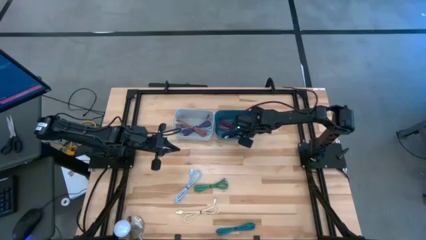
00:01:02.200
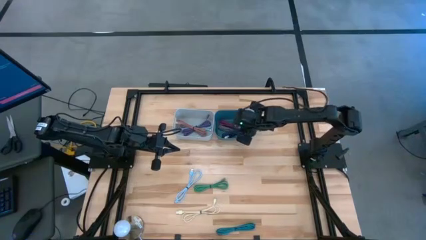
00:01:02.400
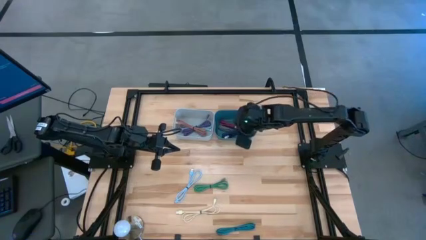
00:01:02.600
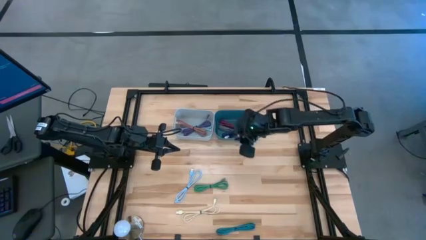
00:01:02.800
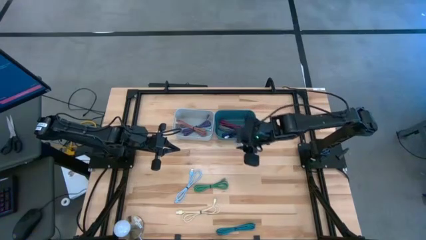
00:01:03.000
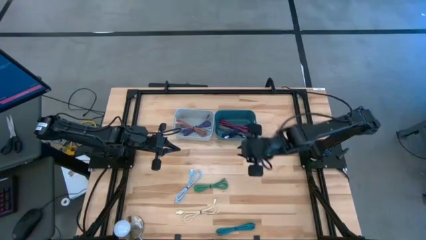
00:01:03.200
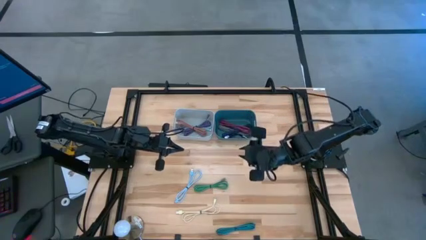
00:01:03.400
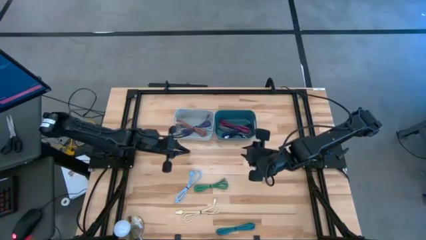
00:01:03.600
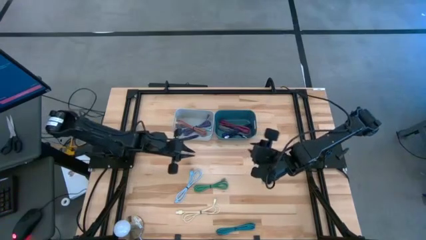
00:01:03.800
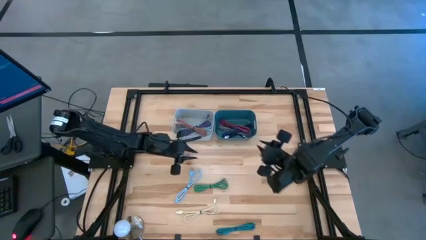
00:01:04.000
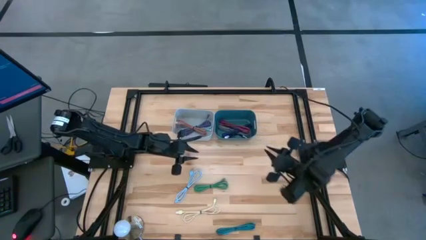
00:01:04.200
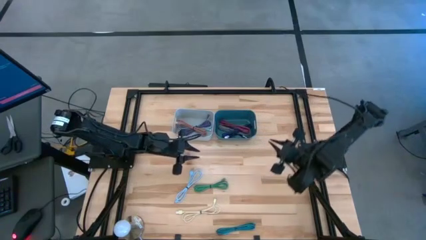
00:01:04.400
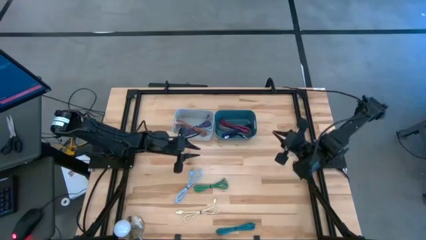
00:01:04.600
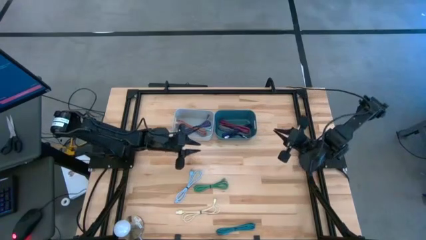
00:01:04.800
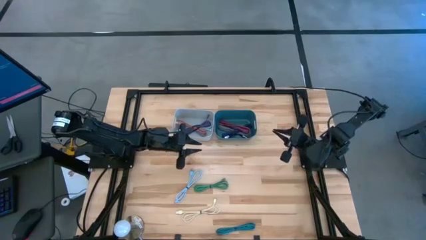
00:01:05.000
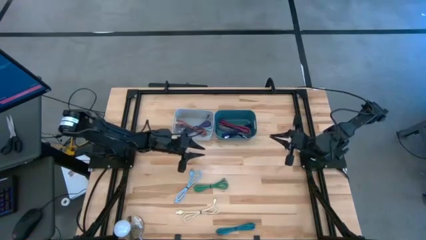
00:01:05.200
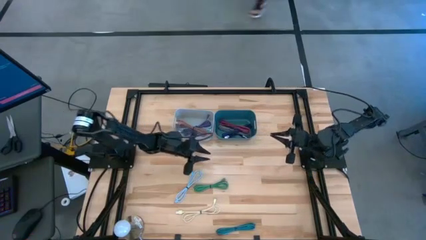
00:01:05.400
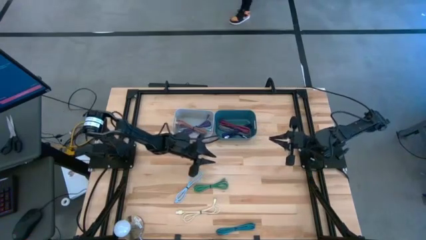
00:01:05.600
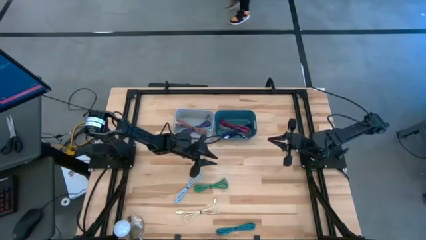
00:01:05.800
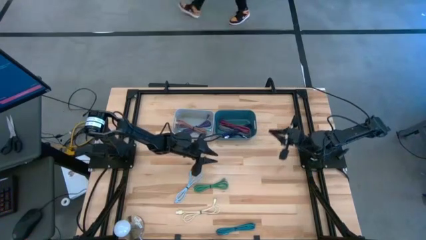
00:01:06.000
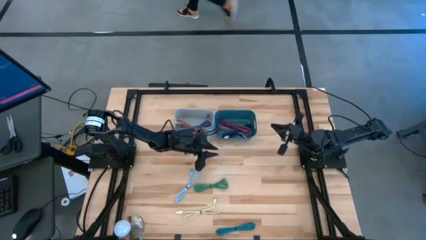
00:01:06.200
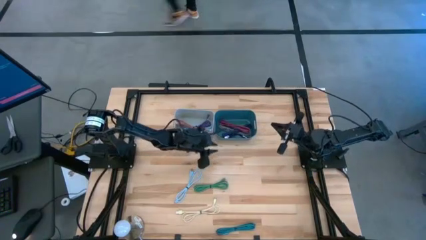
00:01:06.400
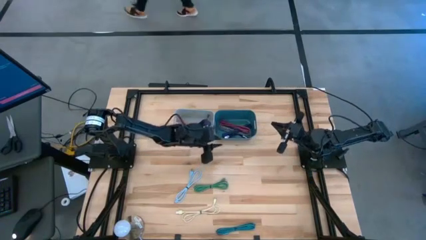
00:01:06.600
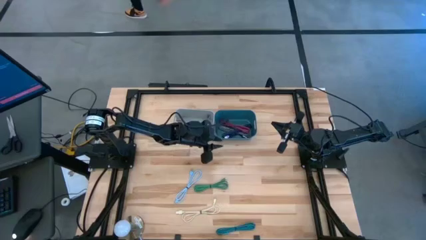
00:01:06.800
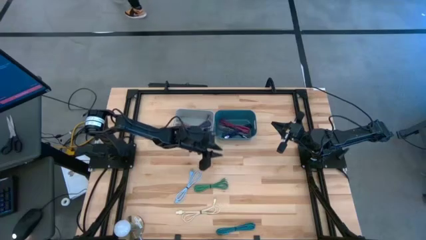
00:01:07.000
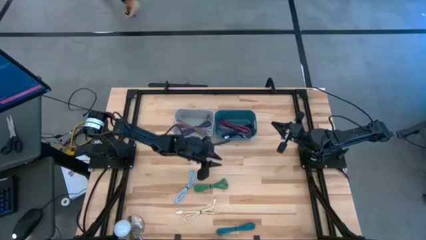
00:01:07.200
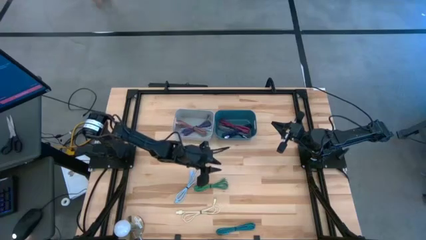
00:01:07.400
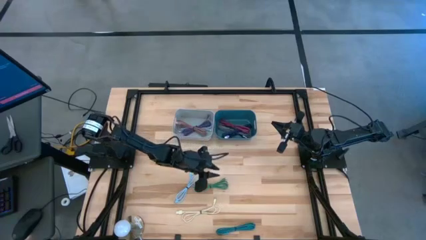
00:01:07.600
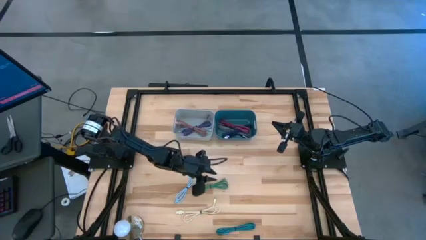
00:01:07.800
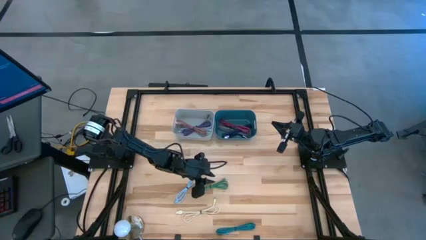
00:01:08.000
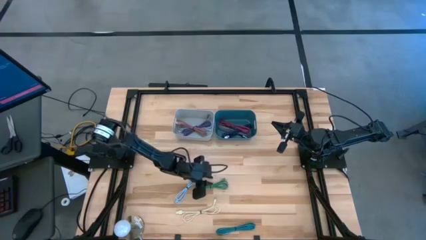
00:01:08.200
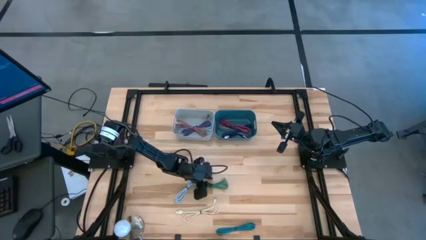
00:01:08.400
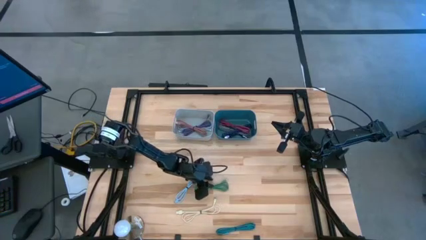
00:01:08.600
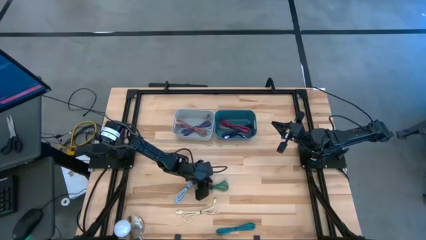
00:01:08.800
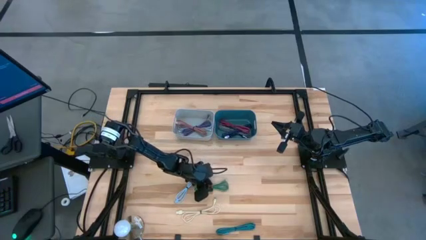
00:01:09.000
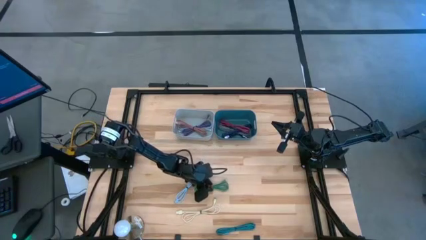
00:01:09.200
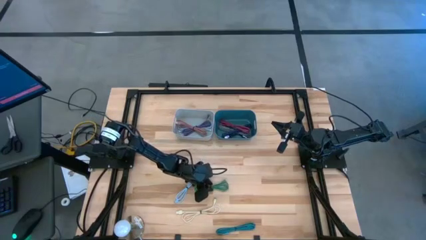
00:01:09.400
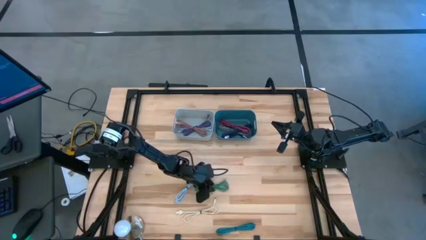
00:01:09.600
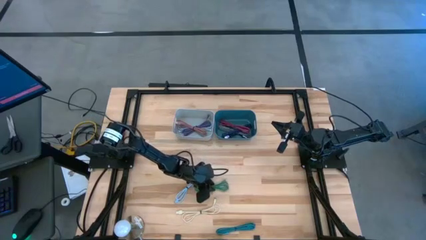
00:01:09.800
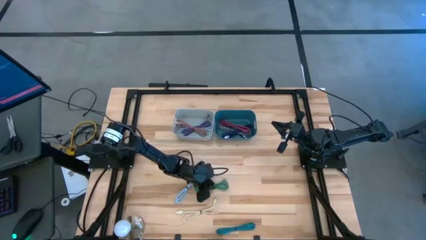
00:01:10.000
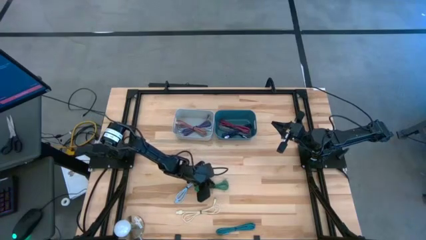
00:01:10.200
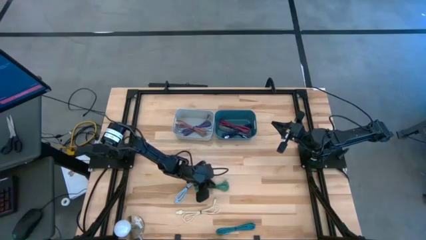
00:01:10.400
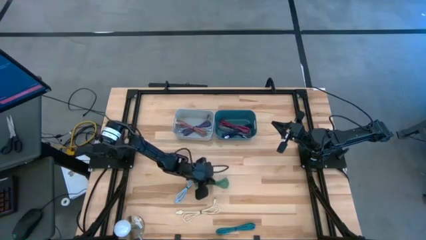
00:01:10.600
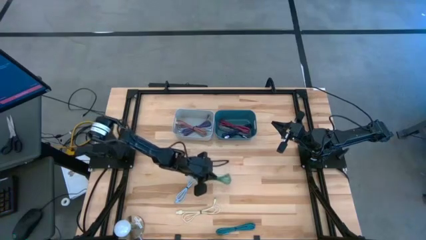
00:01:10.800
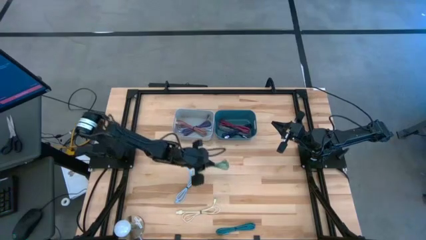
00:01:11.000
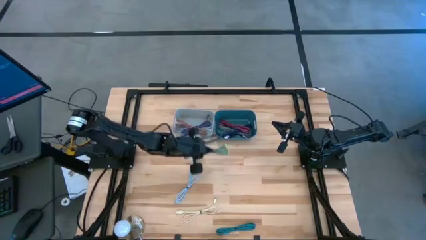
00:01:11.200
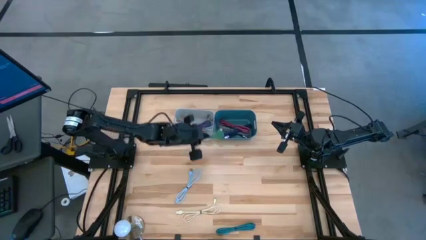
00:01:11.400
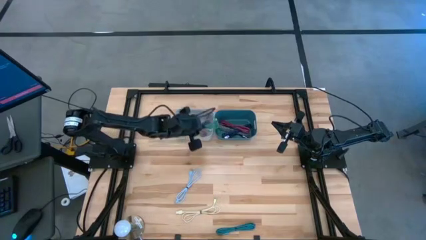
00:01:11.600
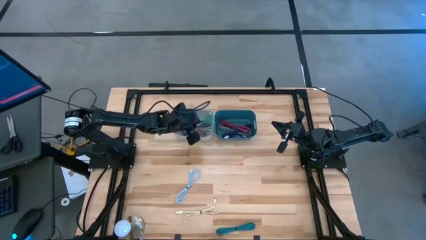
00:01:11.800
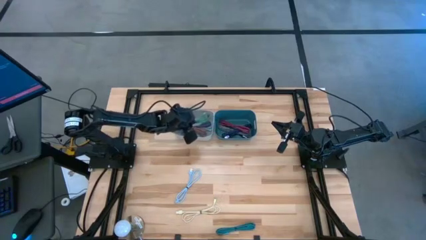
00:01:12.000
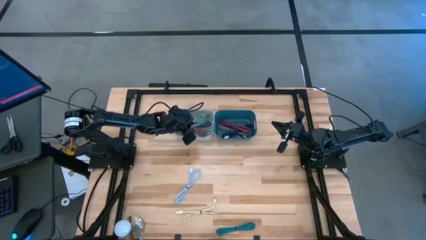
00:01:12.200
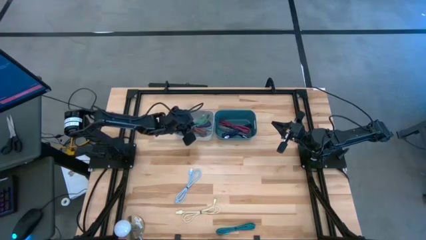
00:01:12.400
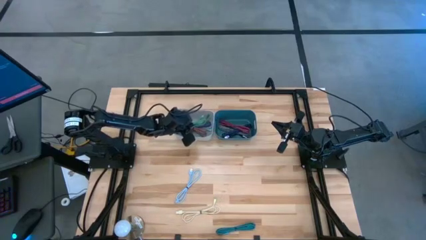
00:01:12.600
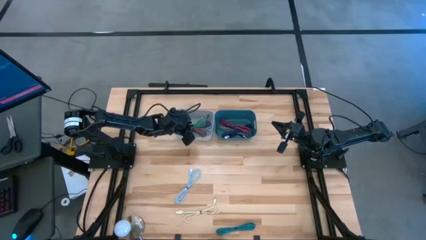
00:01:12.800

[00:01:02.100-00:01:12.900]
Task: Pick & Place USB Port
Put the green charger cable into the white bin

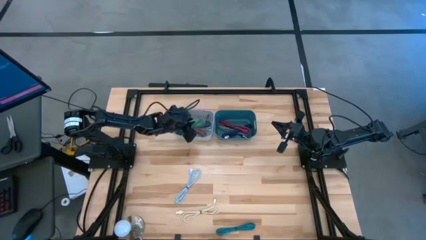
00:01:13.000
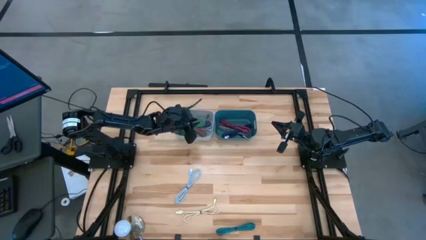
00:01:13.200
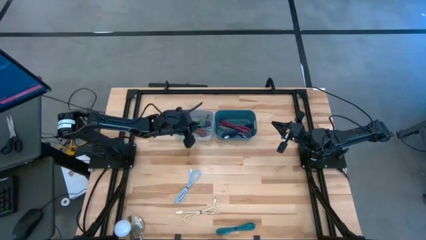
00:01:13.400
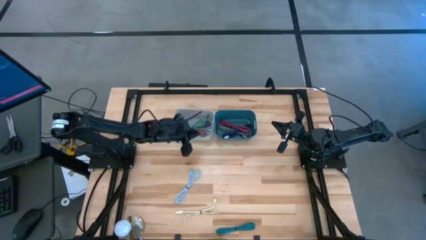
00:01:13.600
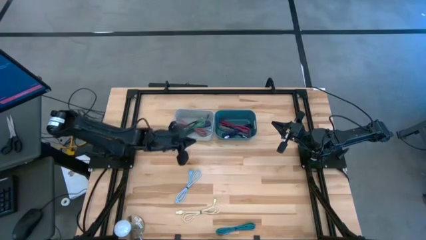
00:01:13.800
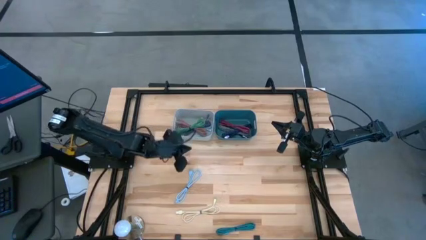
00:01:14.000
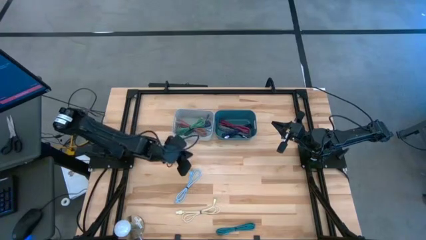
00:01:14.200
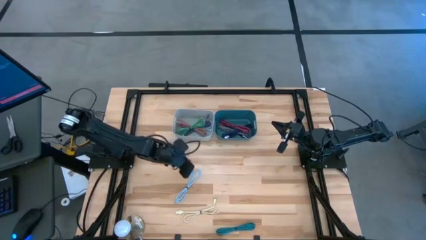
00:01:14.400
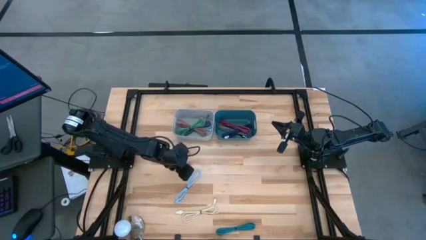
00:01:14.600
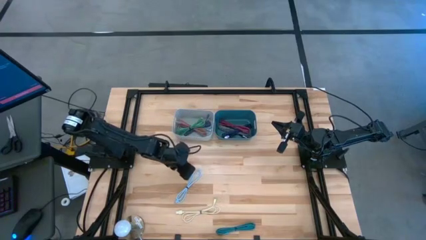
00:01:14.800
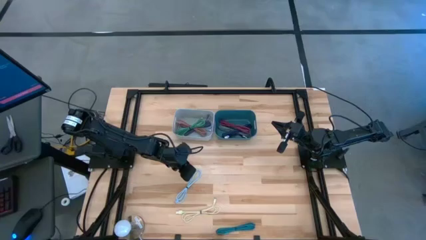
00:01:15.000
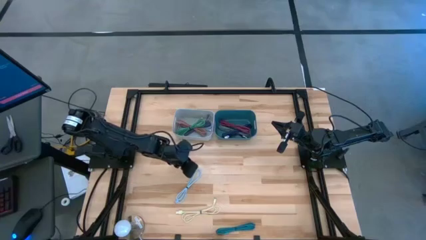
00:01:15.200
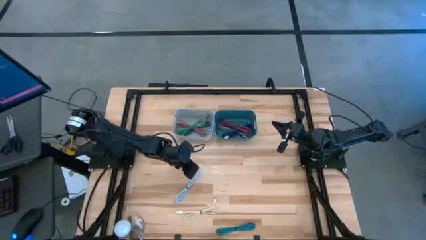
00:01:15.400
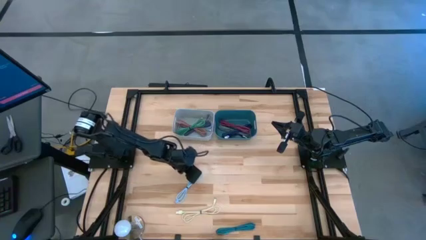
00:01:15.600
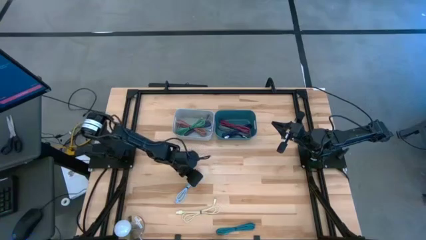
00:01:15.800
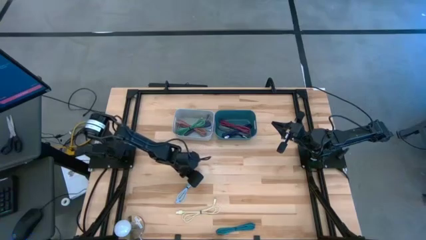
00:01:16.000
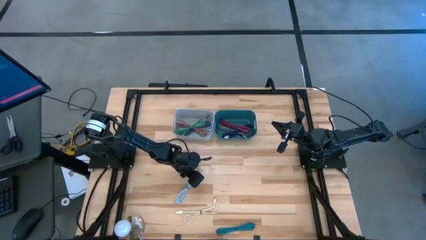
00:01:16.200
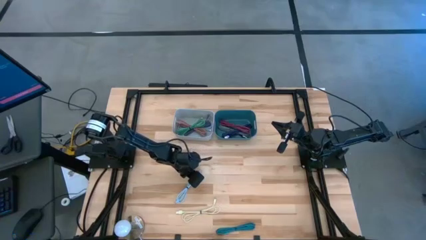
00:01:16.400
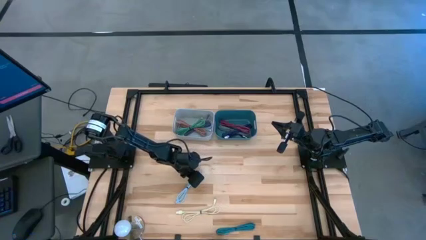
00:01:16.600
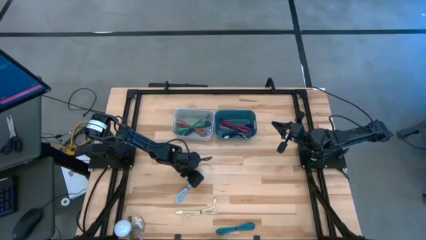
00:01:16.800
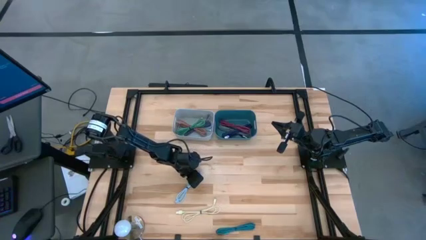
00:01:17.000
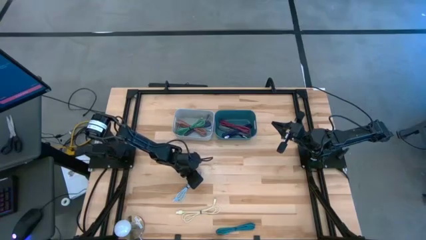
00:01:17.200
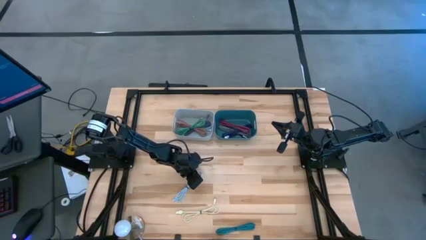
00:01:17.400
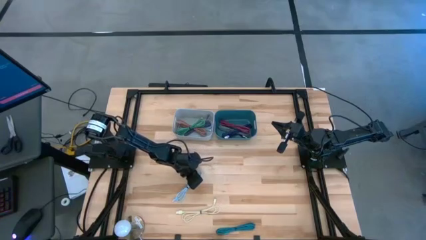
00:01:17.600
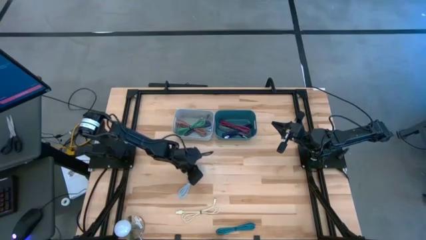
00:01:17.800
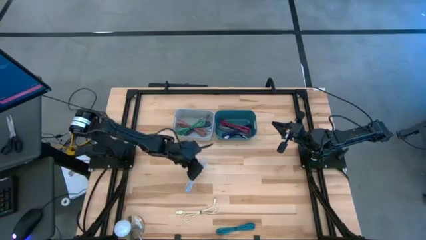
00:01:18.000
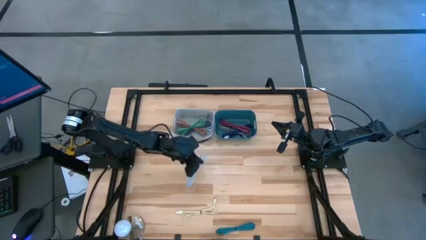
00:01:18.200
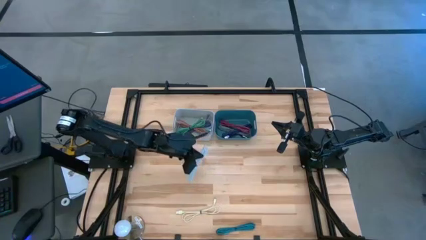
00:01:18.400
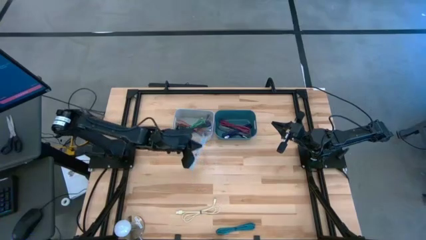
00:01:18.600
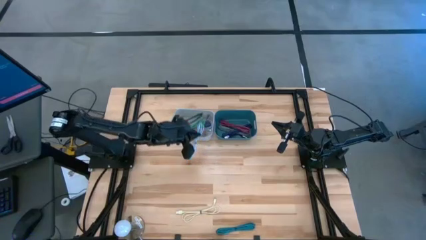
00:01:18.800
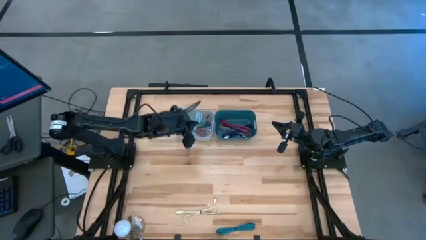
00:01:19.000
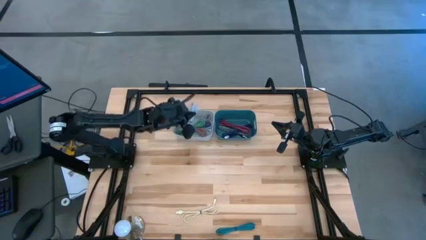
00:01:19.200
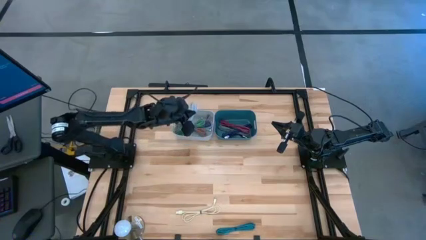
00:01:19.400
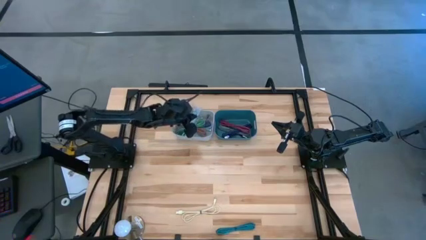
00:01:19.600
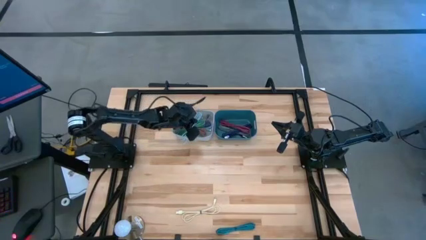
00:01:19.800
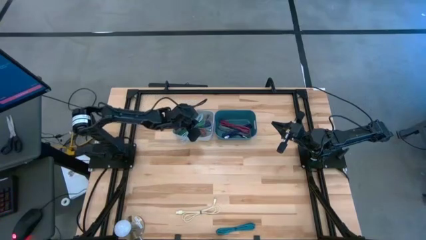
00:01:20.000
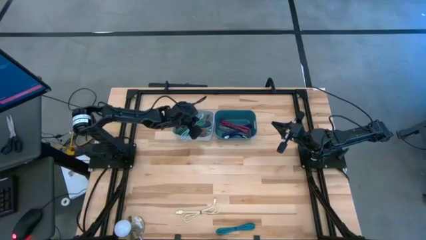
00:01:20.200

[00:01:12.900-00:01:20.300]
Put the light blue charger cable into the white bin
